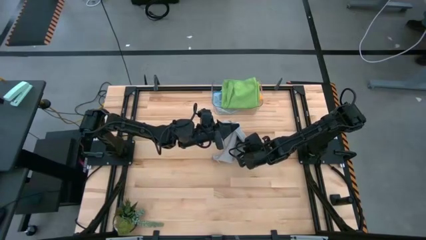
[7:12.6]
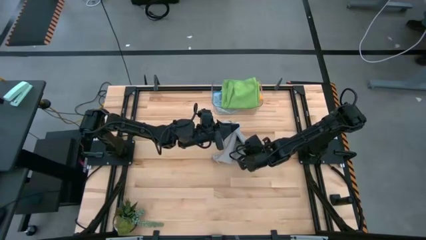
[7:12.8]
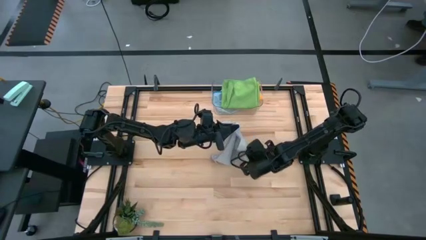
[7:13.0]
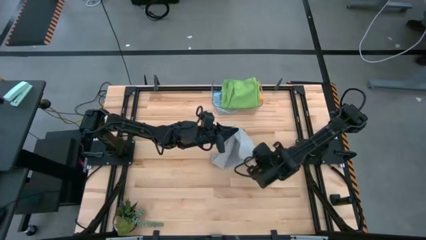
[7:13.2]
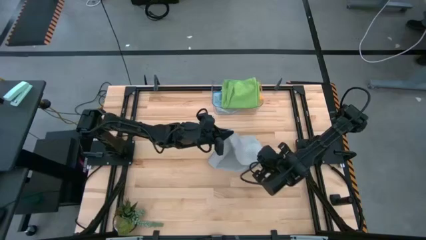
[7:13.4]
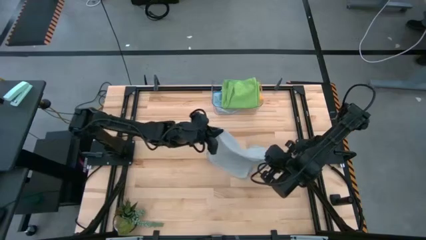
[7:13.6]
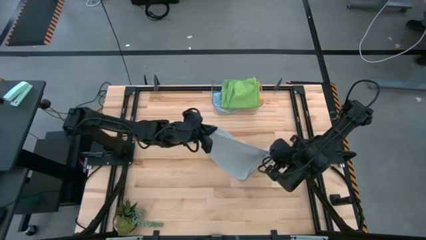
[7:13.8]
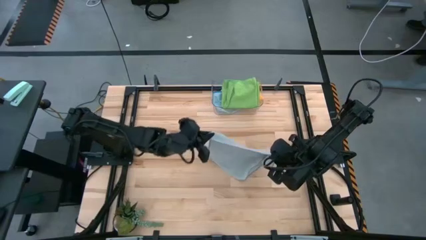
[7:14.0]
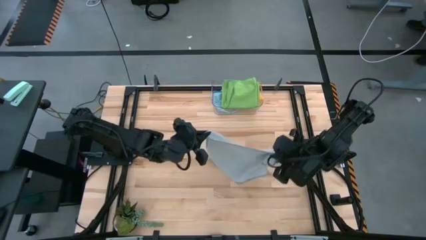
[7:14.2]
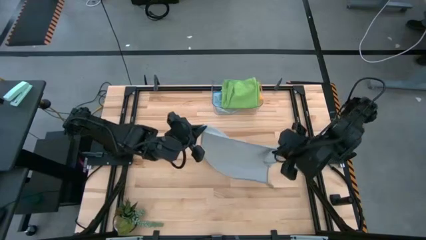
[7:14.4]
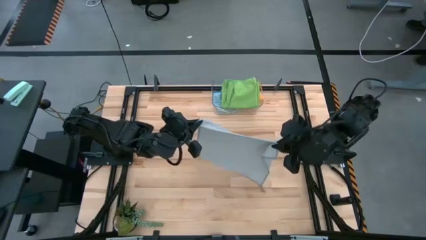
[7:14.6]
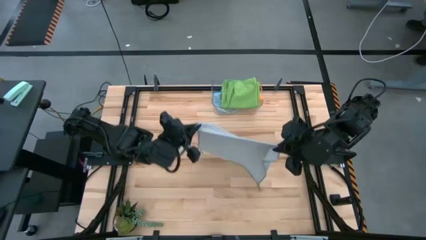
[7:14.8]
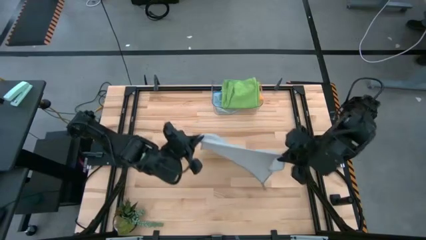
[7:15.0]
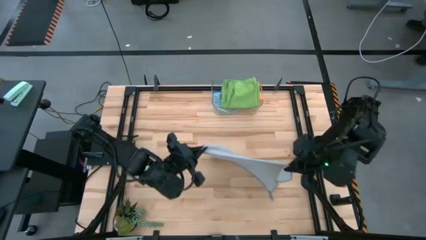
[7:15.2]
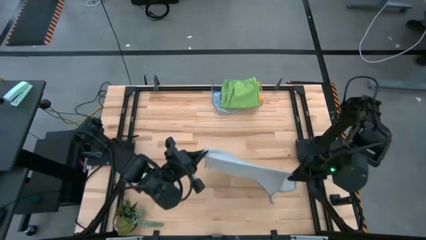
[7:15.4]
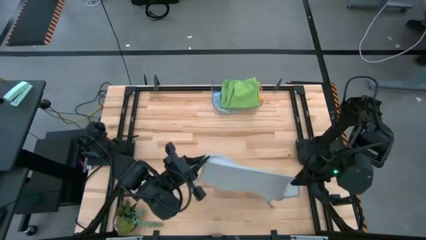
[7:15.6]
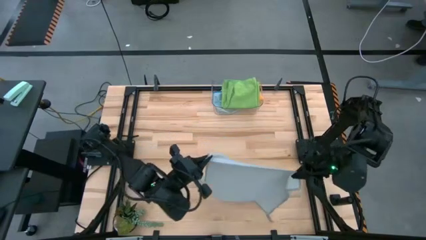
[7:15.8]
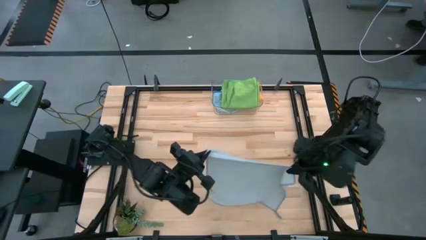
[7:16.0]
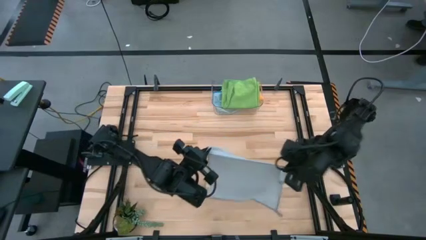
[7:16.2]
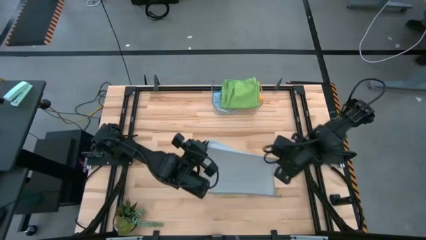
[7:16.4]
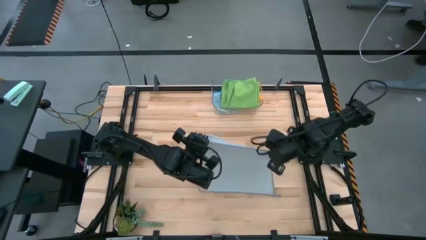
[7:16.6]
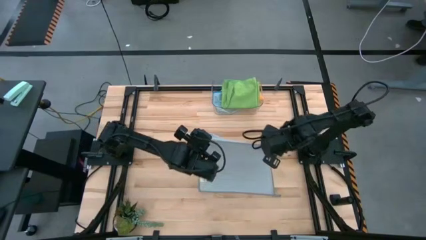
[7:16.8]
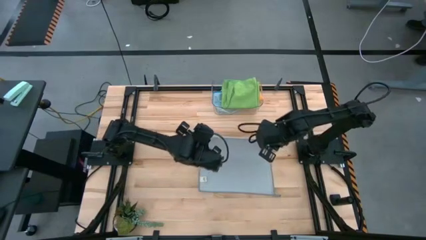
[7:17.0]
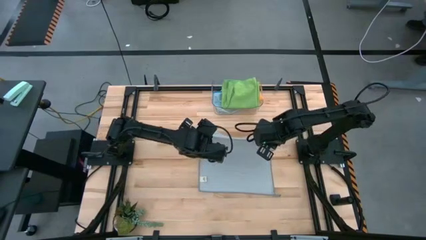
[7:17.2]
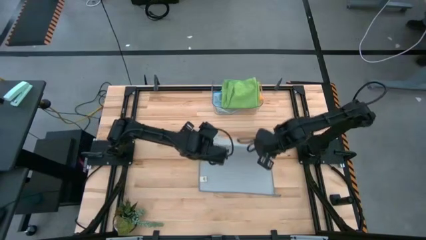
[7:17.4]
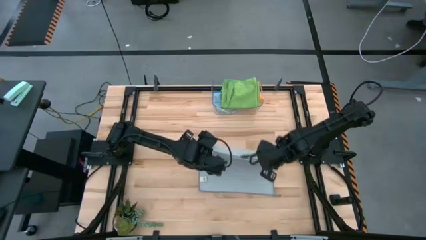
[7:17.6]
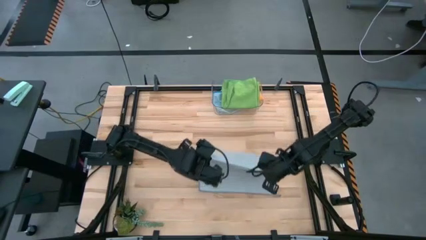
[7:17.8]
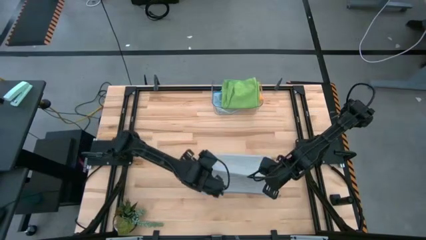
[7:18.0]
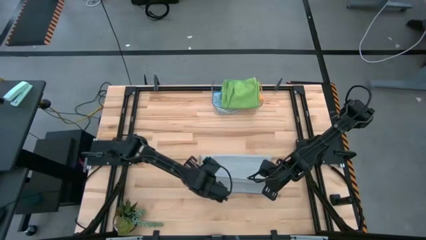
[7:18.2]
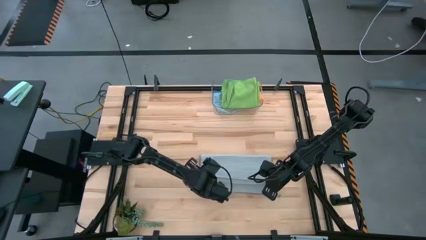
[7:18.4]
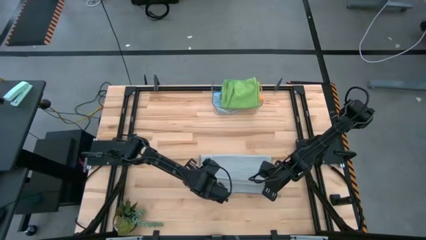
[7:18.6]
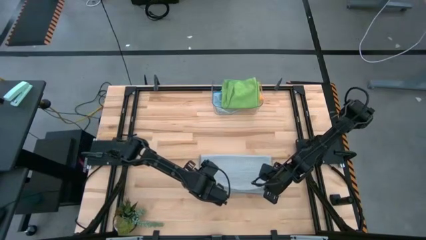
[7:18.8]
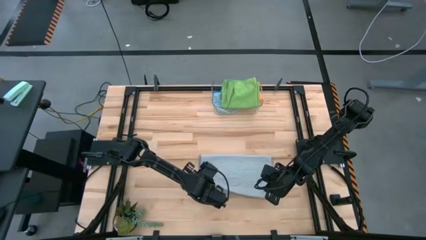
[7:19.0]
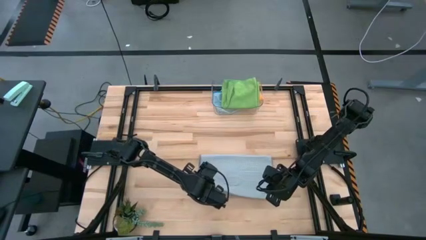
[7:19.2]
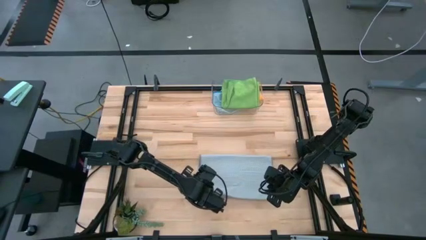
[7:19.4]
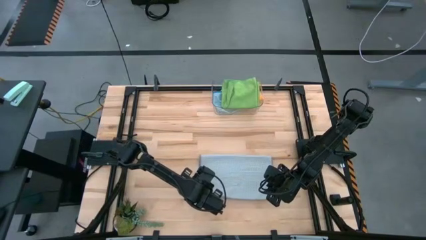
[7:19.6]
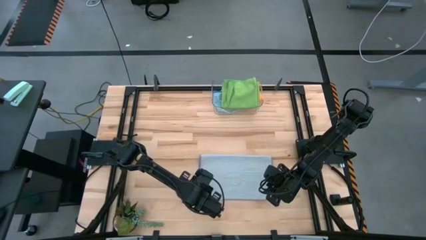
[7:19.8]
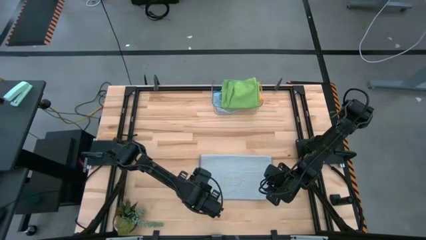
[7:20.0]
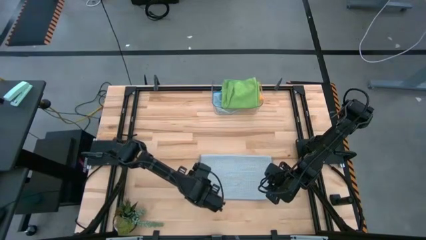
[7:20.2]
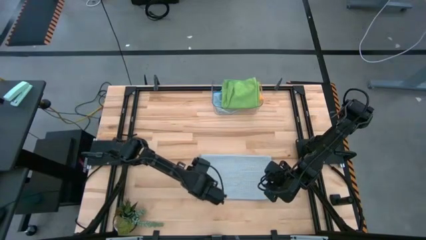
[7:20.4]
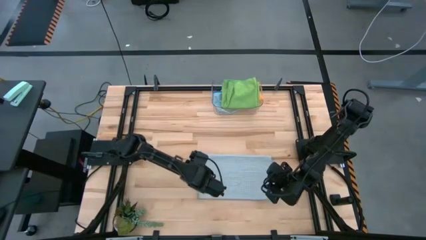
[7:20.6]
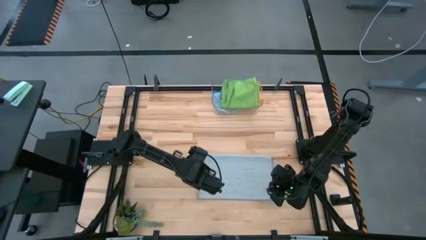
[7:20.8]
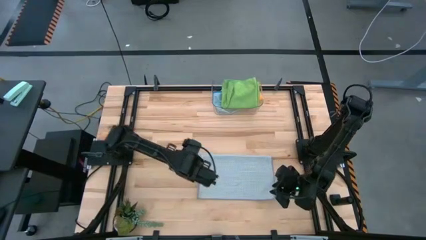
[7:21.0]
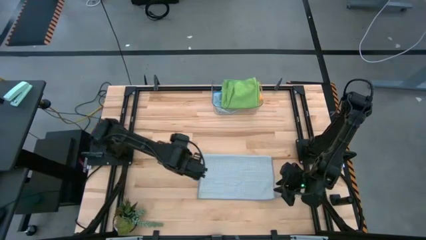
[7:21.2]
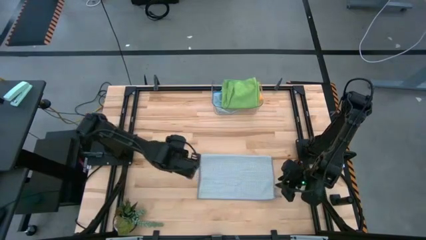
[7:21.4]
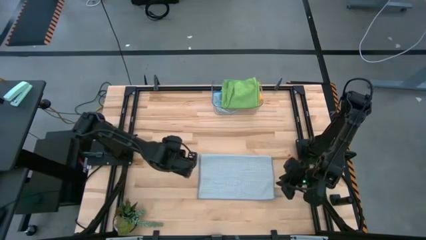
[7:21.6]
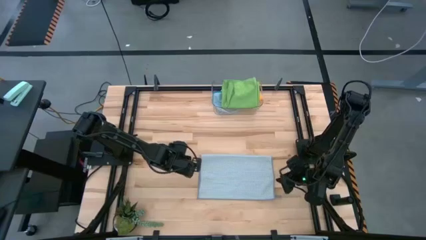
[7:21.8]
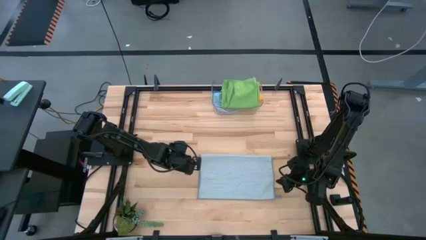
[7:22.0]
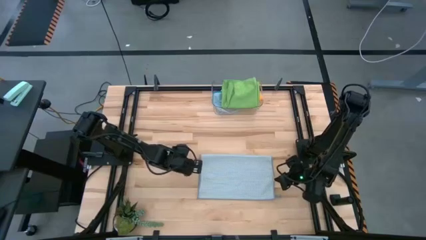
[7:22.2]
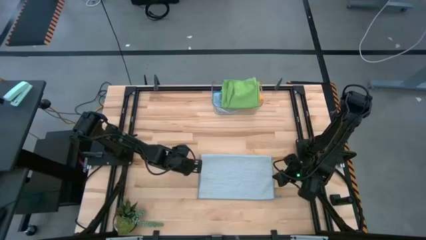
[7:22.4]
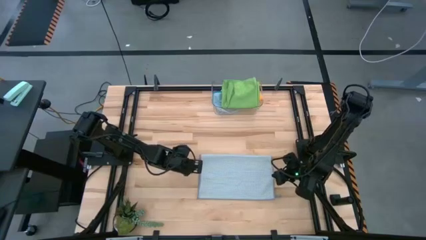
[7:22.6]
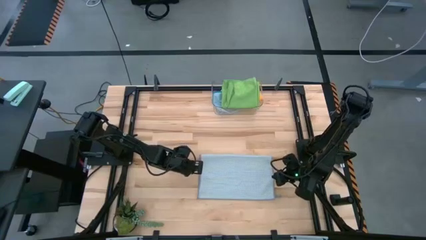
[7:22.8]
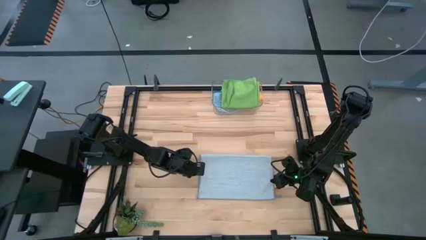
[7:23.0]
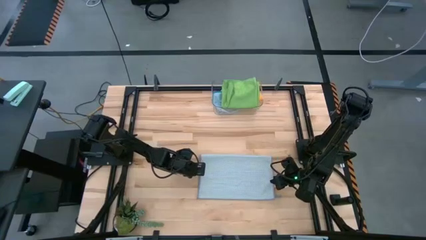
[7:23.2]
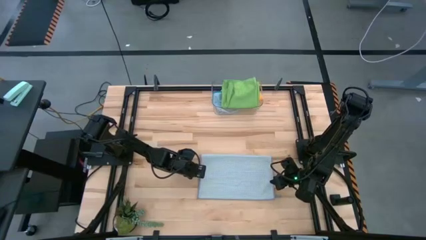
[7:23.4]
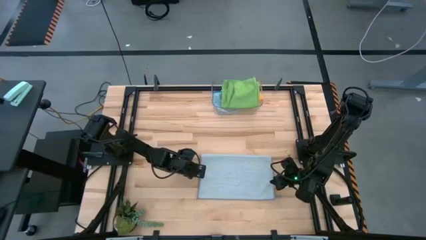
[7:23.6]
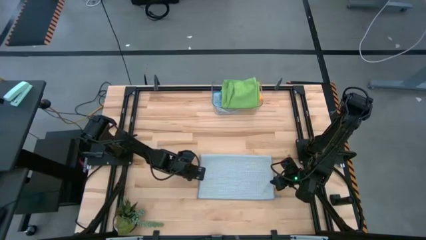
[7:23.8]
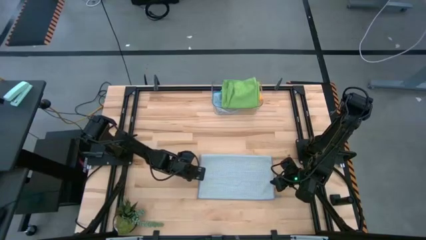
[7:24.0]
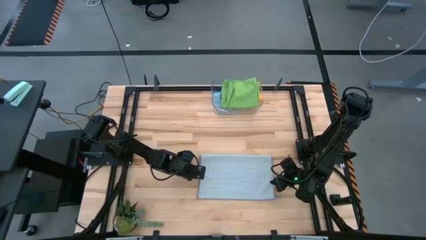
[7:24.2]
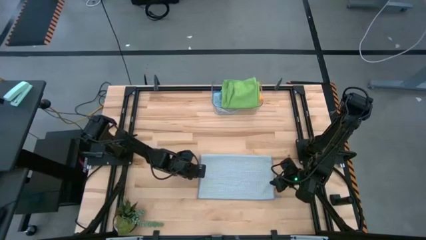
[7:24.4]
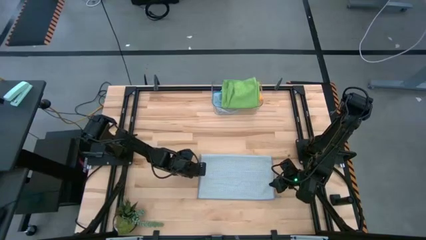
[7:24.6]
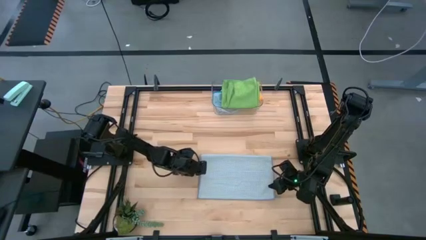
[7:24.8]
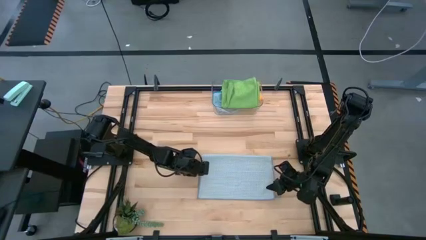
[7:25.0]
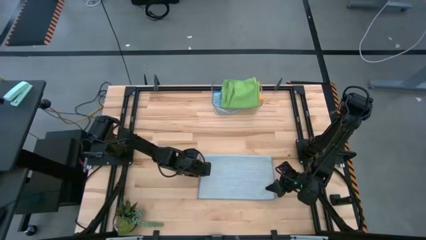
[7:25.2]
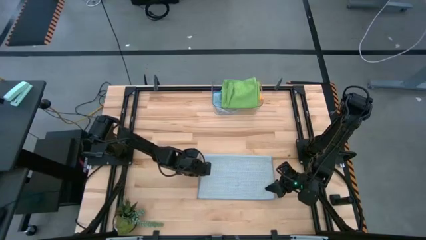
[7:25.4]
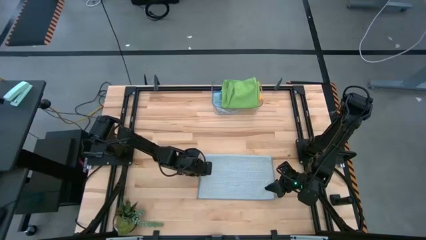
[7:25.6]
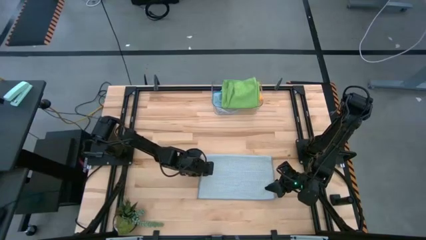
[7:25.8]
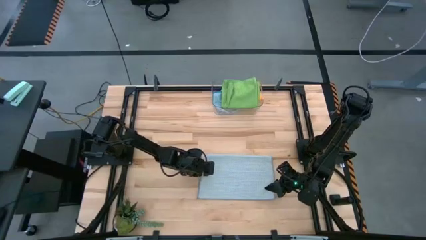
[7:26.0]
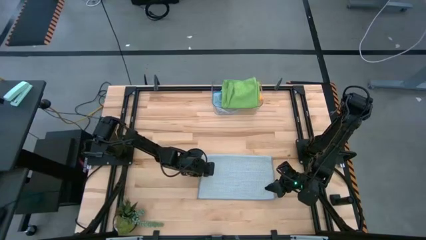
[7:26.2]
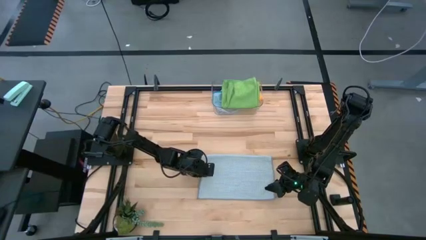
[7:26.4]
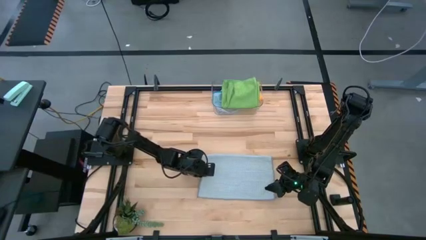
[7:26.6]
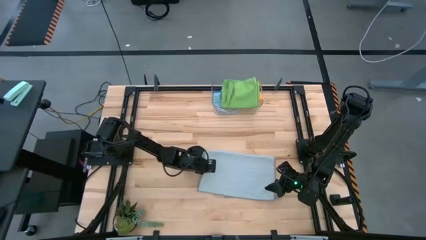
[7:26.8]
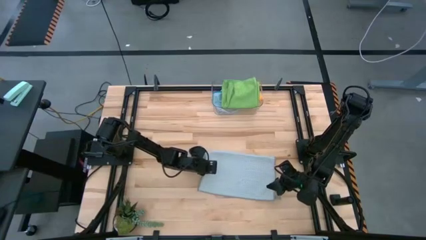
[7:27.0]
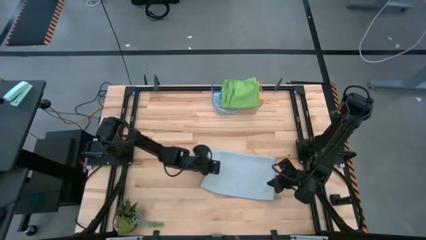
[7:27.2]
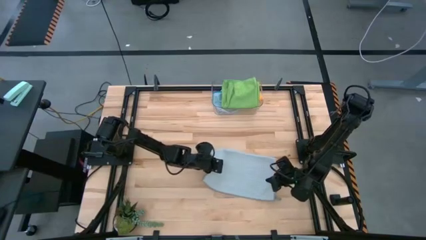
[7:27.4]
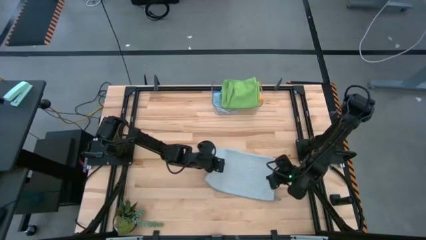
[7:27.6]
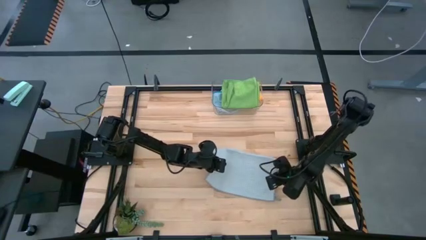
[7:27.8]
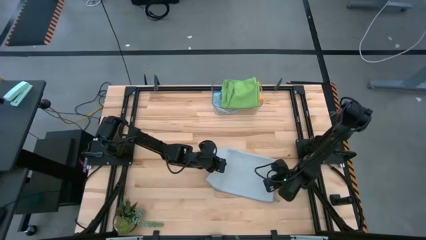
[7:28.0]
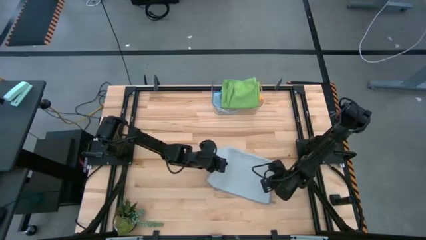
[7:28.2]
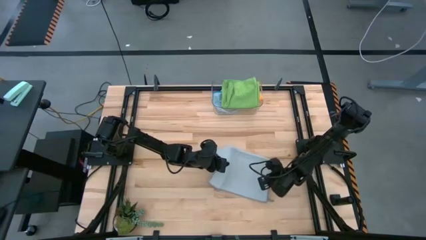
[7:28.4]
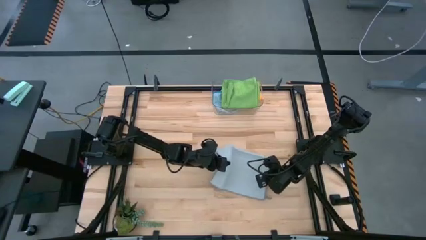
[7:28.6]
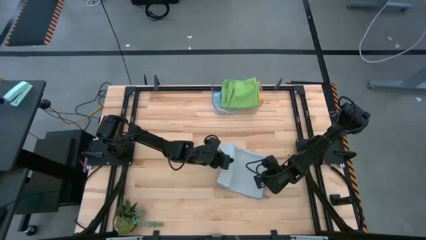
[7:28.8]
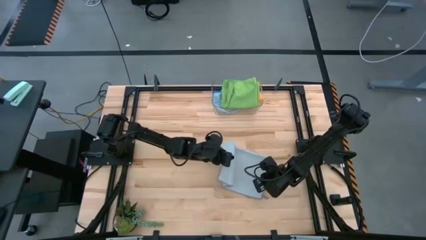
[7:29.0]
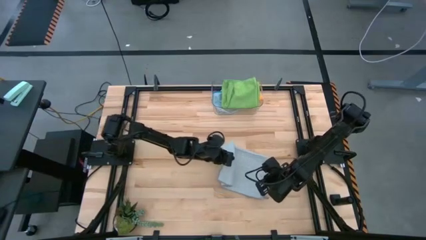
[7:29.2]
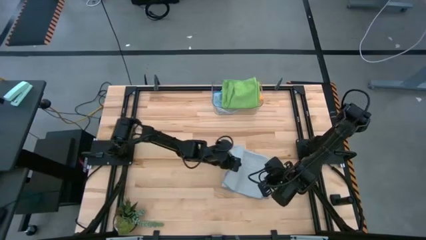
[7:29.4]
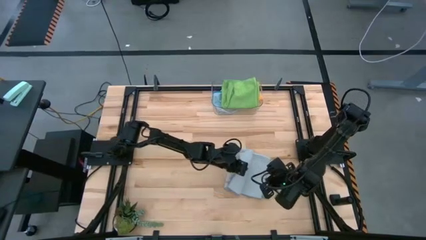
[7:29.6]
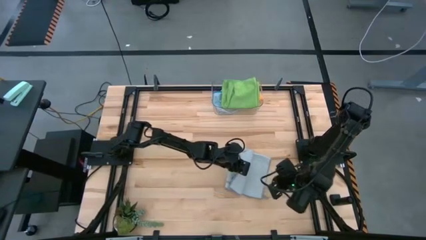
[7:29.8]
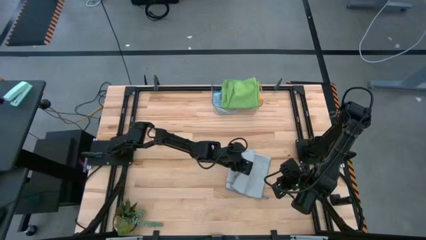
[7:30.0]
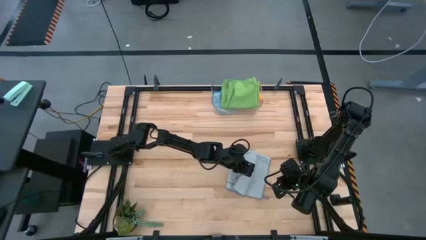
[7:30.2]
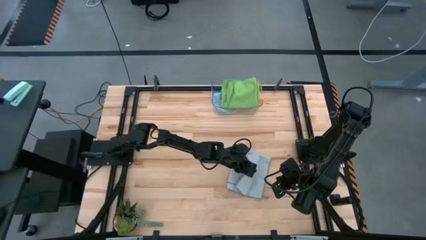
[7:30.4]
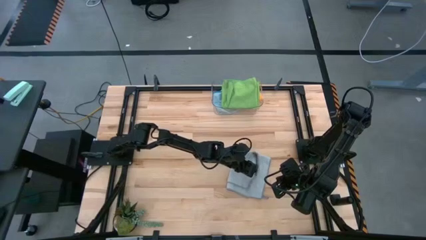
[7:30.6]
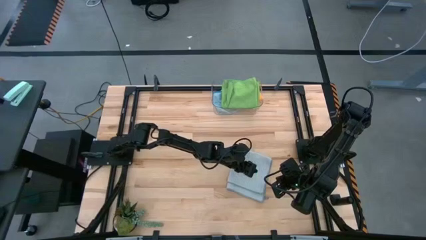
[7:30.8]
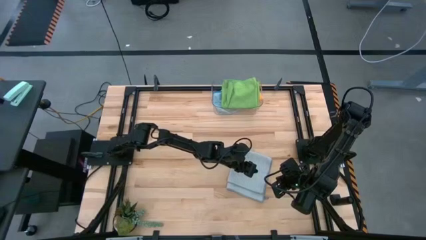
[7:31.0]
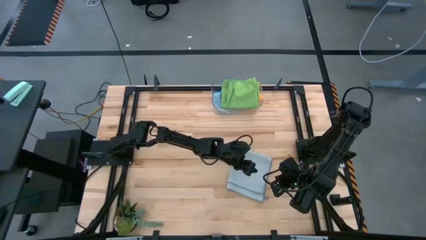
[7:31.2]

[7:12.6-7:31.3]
Task: Fold microfiber towels
Fold the gray microfiber cloth
